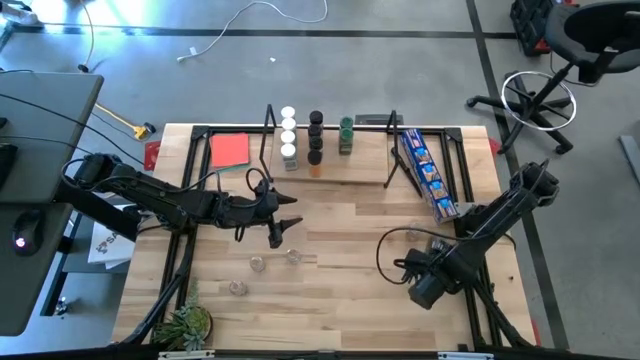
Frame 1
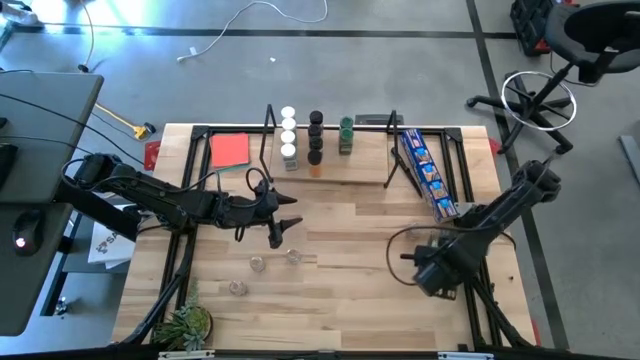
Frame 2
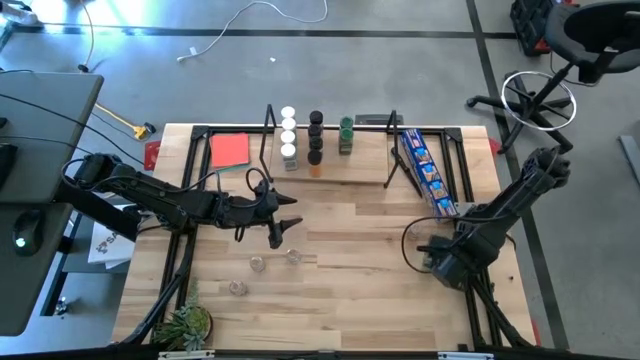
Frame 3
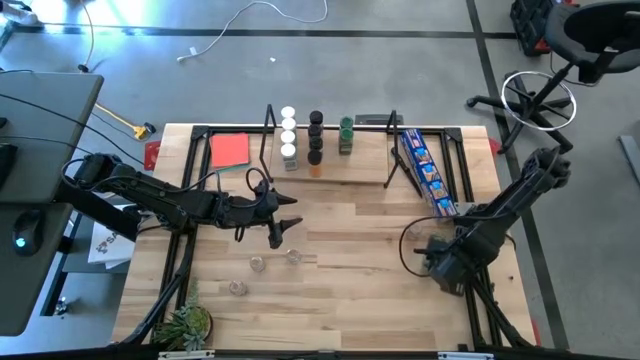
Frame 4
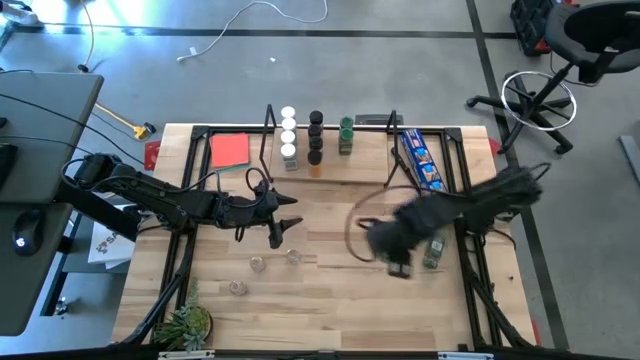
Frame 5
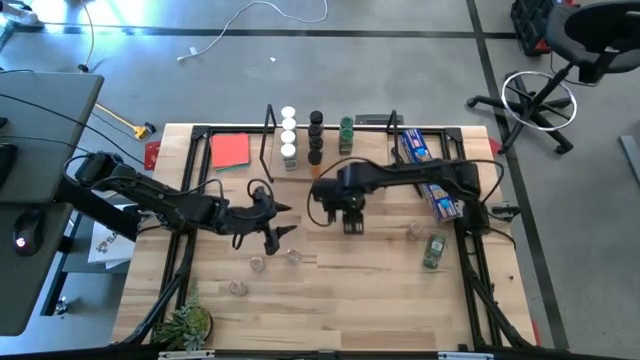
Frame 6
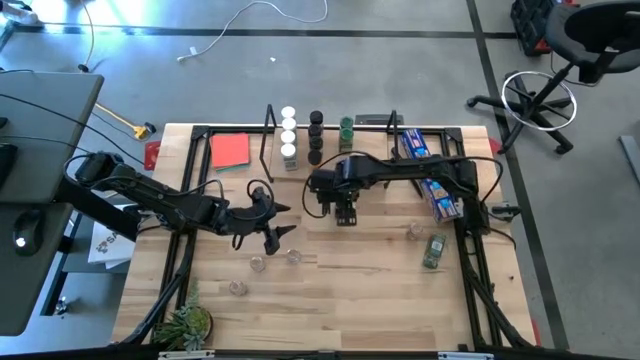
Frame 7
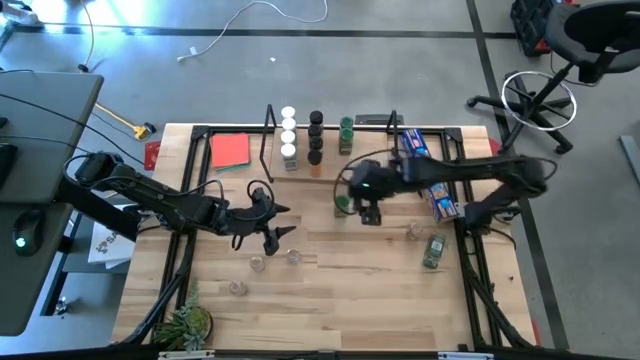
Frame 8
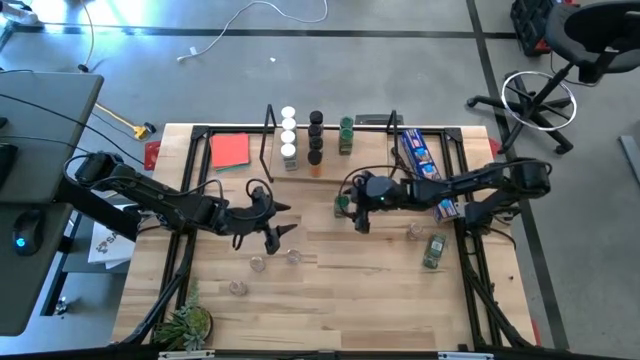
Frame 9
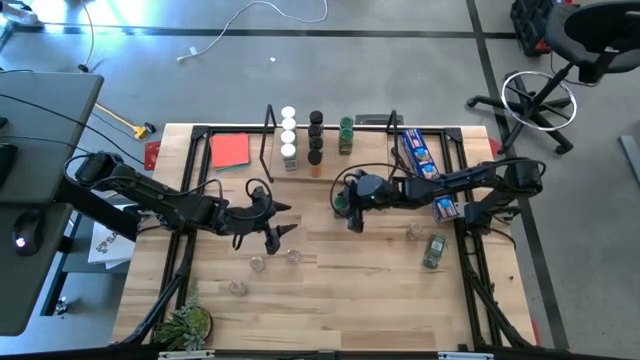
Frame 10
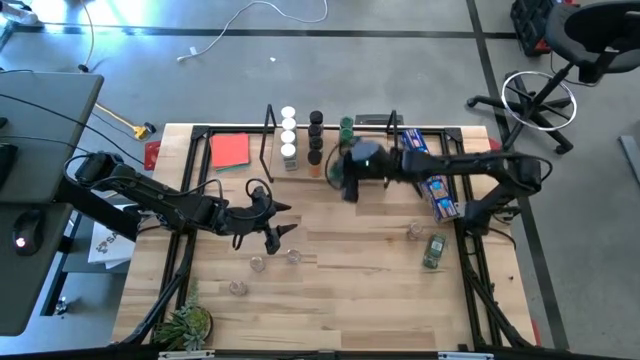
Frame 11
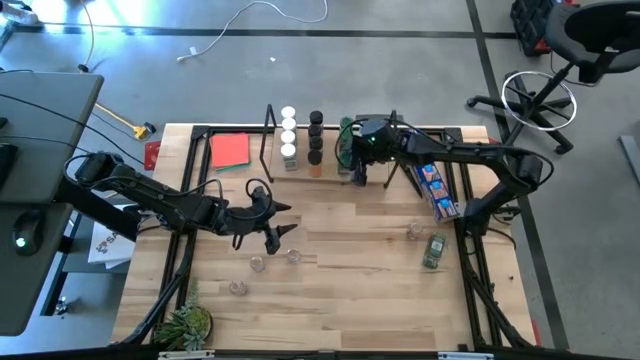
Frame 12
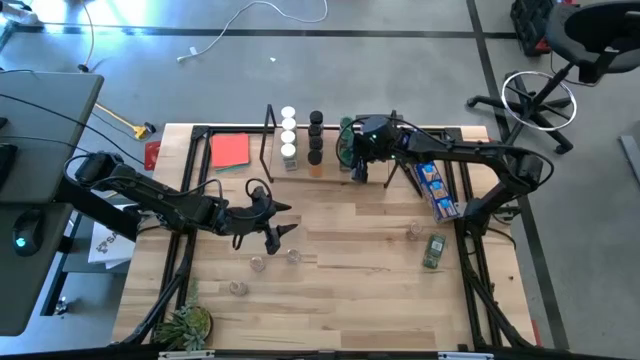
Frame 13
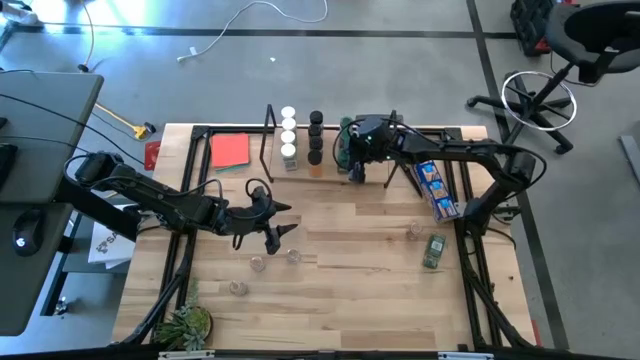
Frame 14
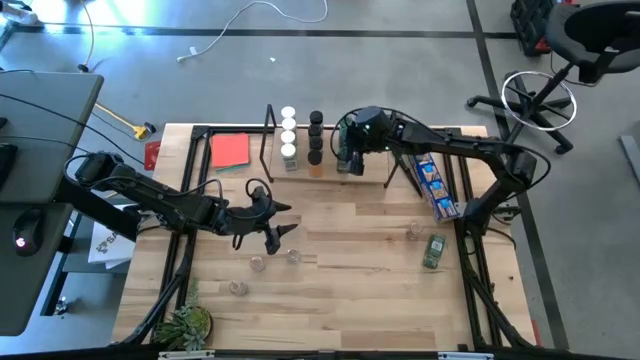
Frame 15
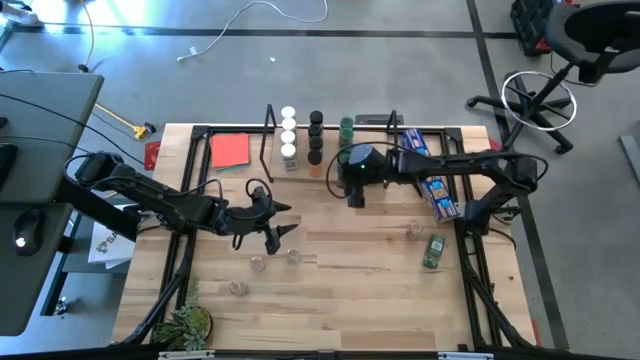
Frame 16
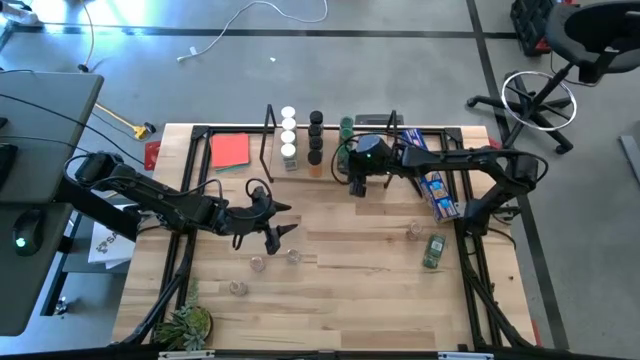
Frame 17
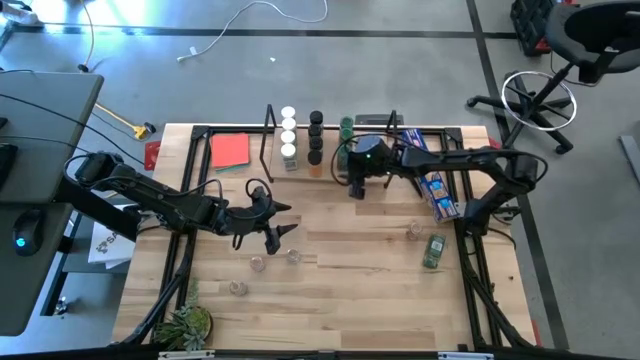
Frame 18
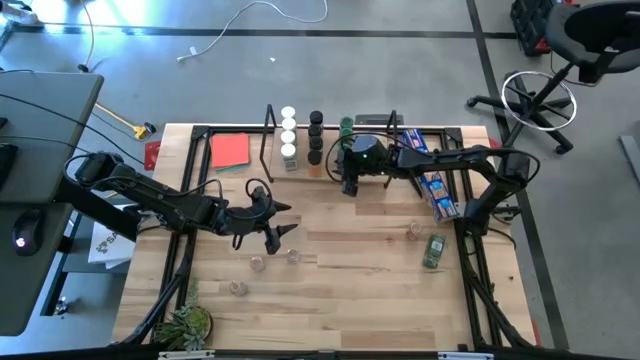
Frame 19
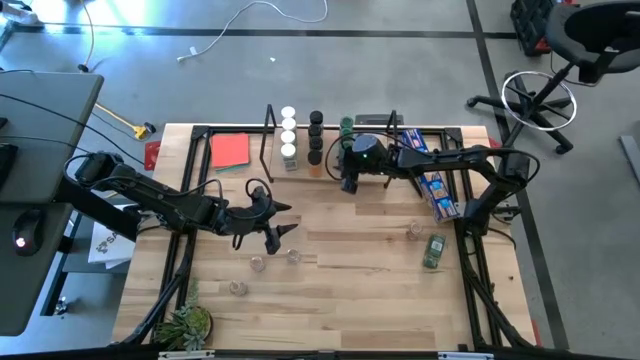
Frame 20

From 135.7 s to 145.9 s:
Task: Shelf spices
Put the green seasoning bottle on the shelf aligned with the other green seasoning bottles

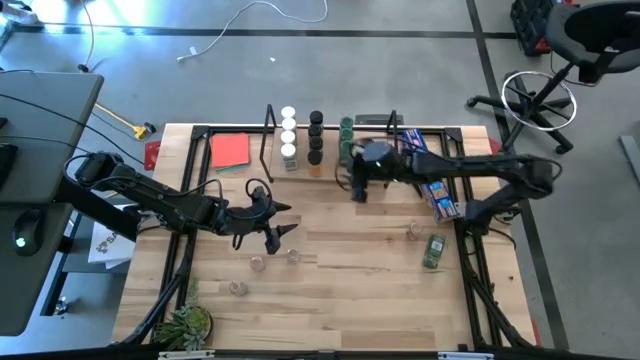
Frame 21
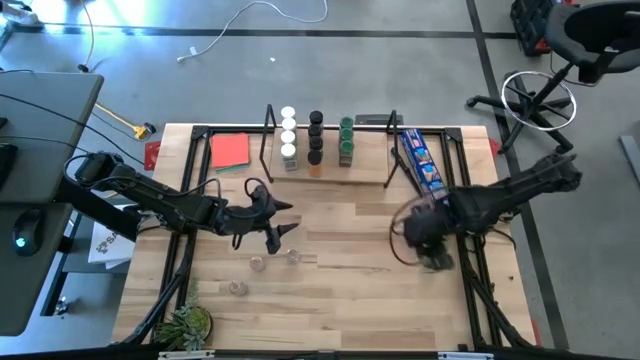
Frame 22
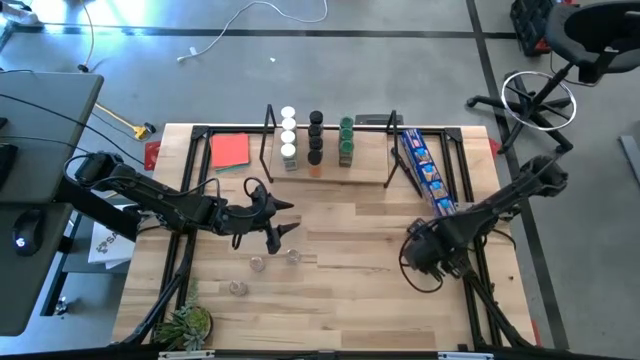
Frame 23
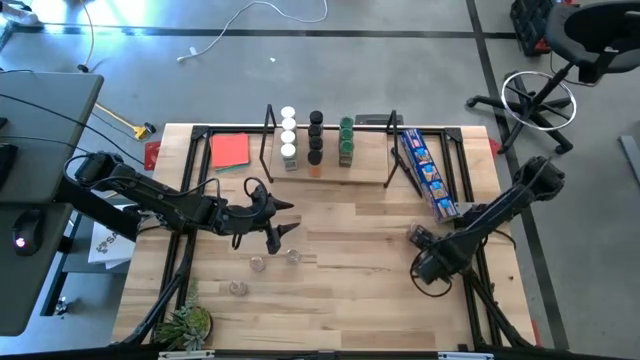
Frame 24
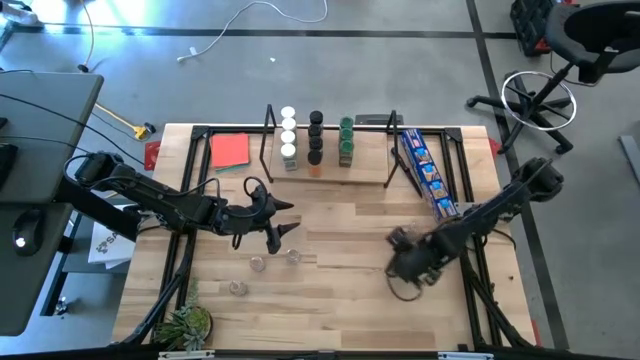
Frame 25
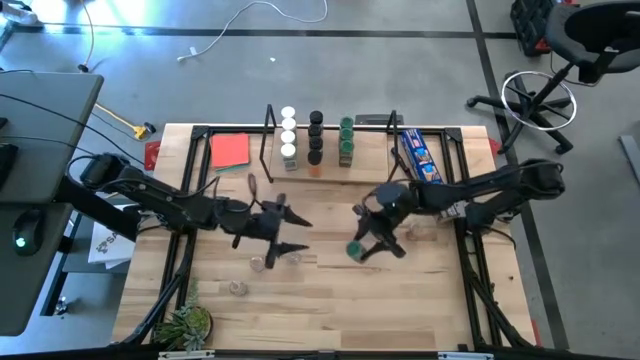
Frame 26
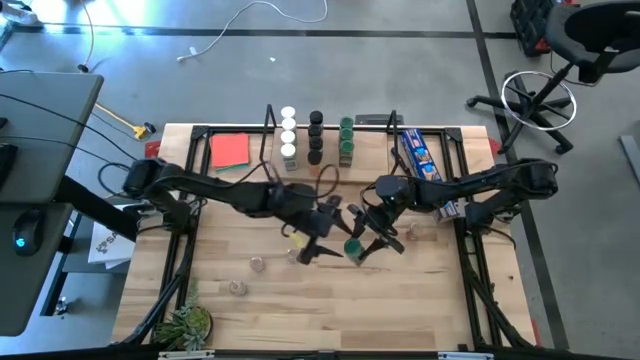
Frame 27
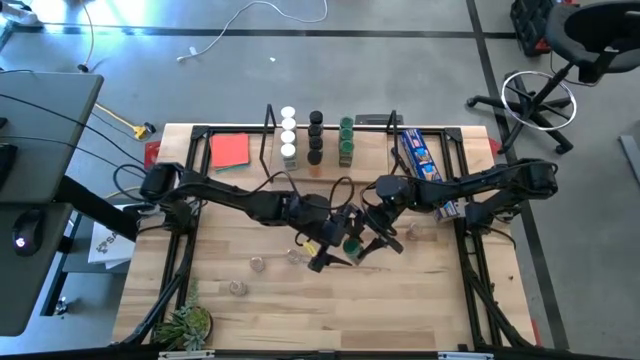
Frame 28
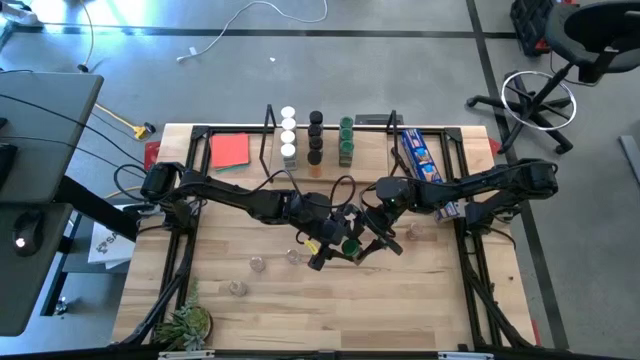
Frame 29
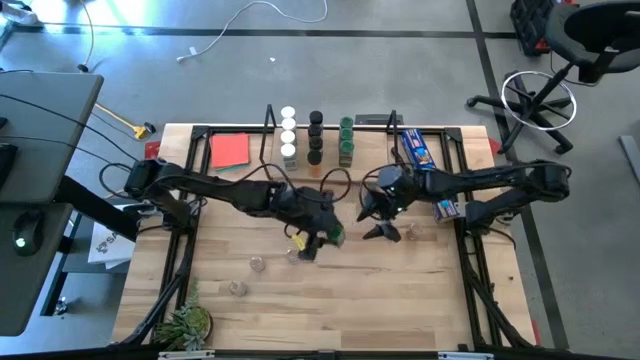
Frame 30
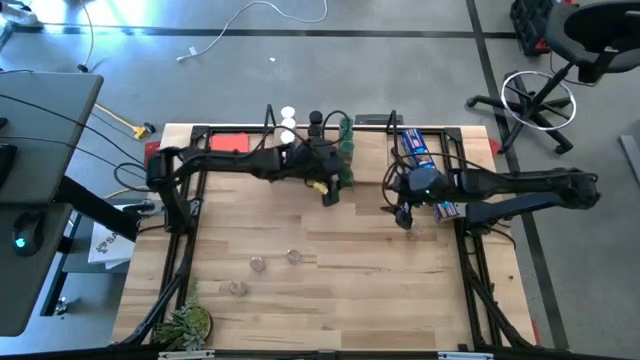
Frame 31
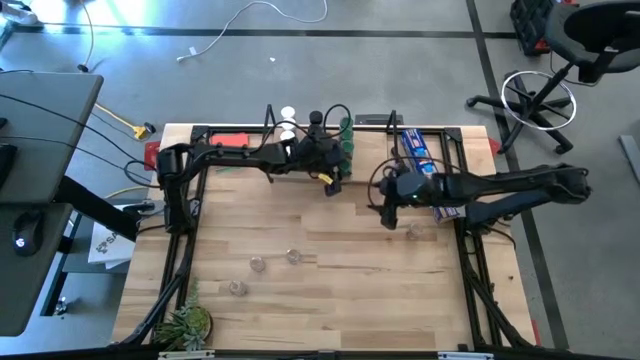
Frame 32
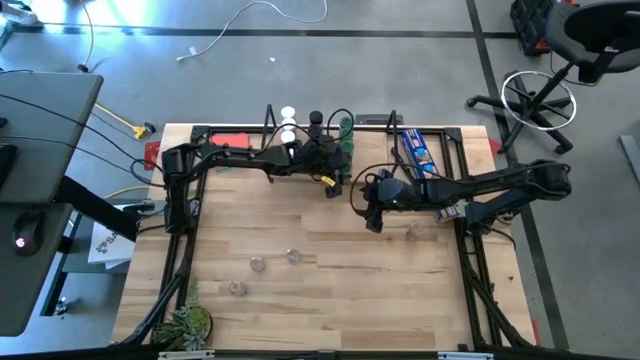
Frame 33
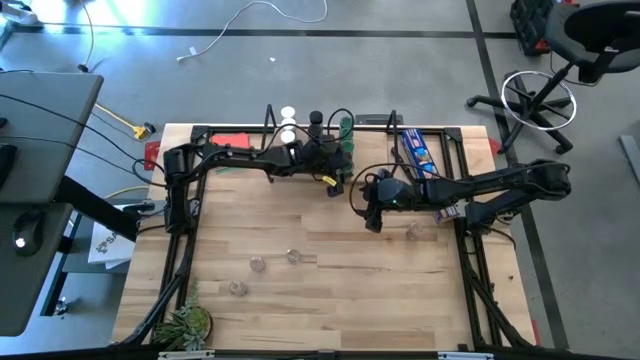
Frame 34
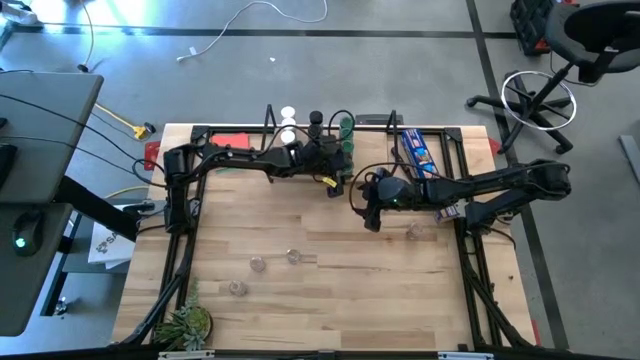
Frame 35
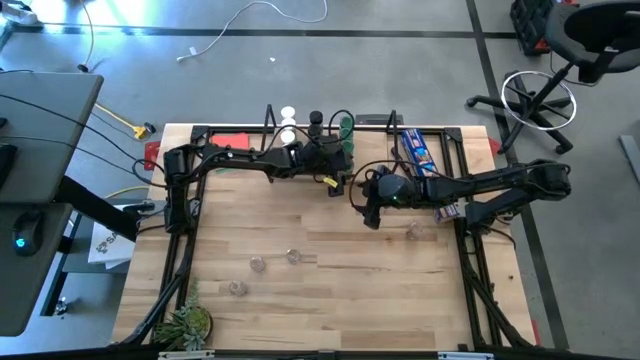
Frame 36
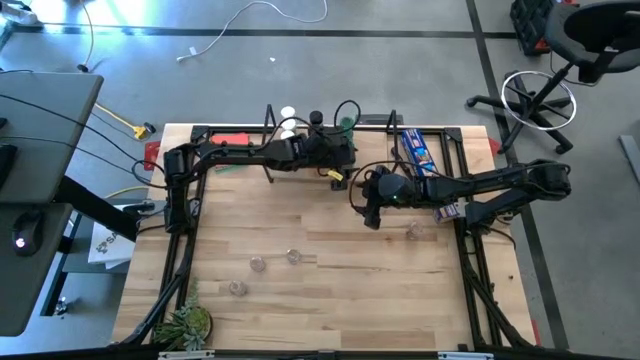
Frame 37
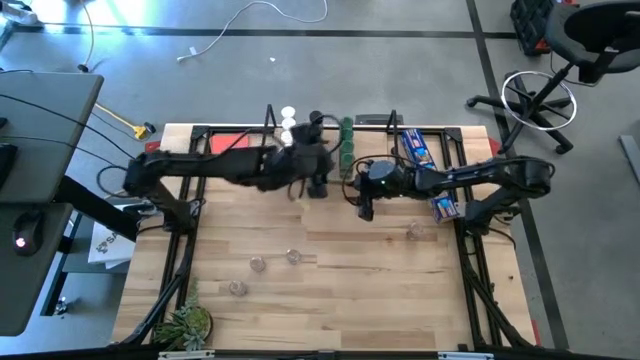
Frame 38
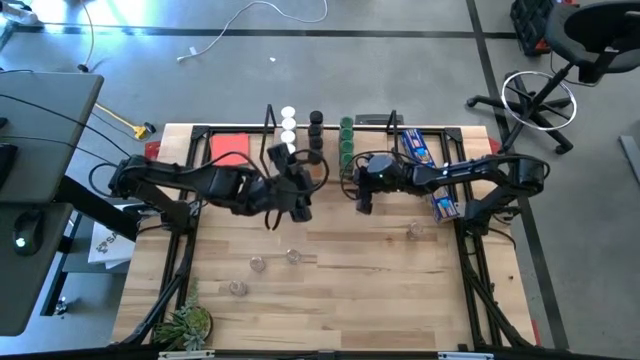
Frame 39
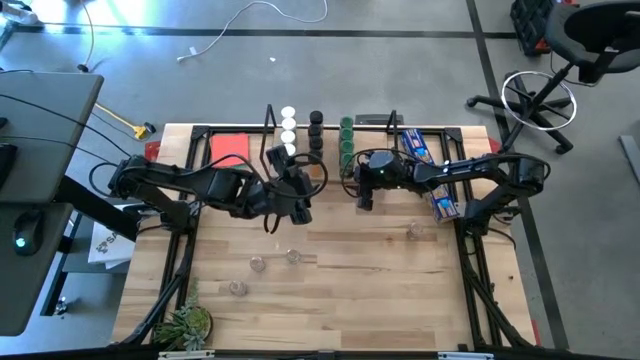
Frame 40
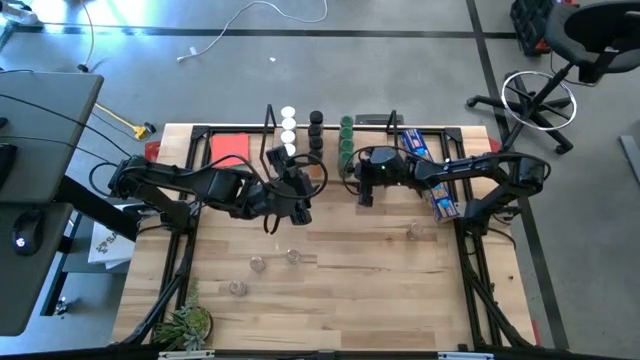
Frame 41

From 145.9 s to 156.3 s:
Put the green seasoning bottle on the shelf aligned with the other green seasoning bottles

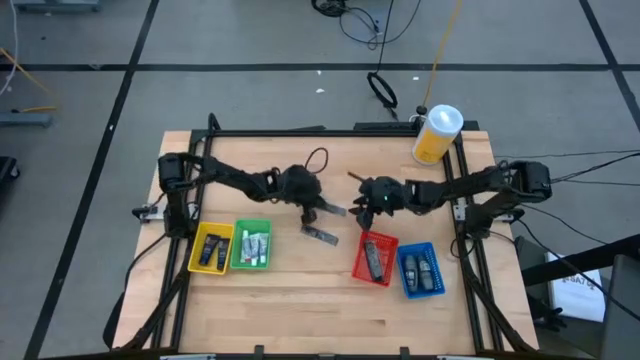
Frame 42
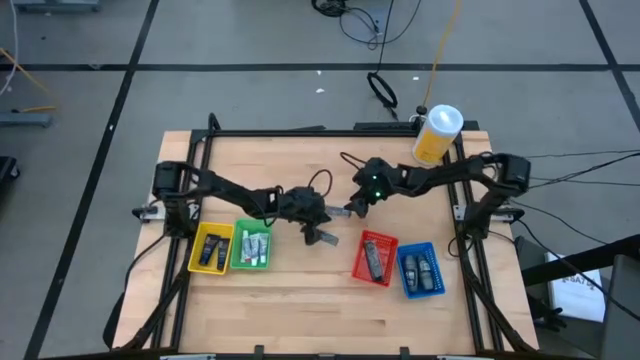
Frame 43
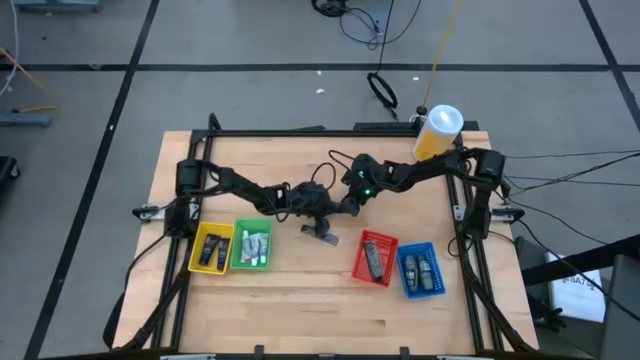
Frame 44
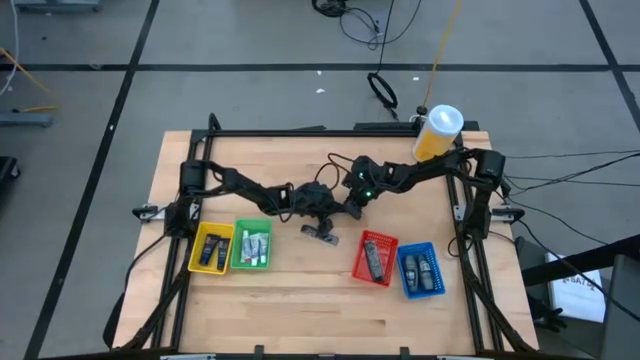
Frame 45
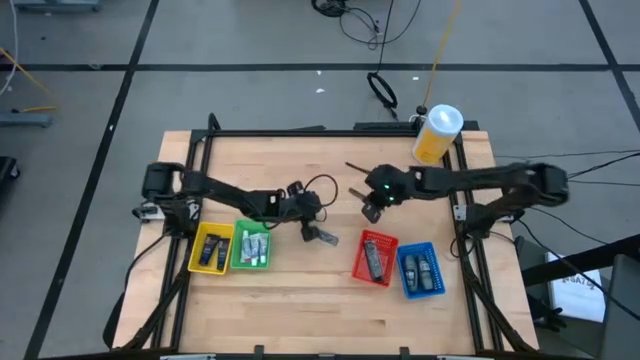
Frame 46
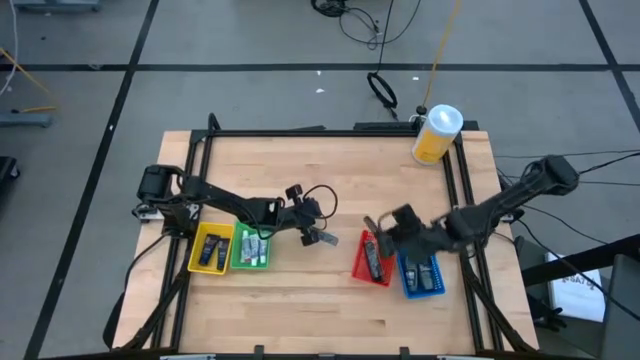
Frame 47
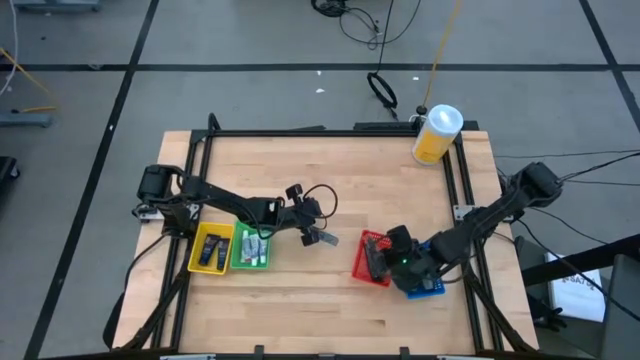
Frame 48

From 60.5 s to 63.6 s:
Task: Pick & Place Travel size toiletries
Put the black comb into the red bin
